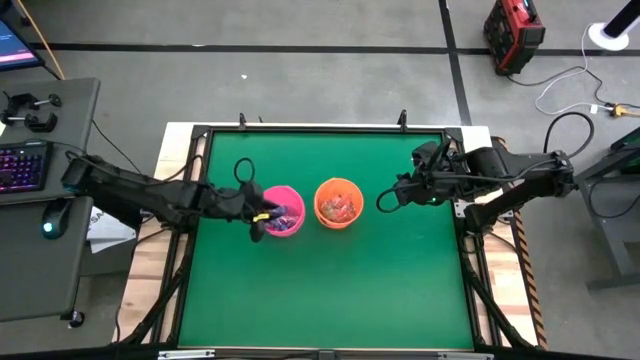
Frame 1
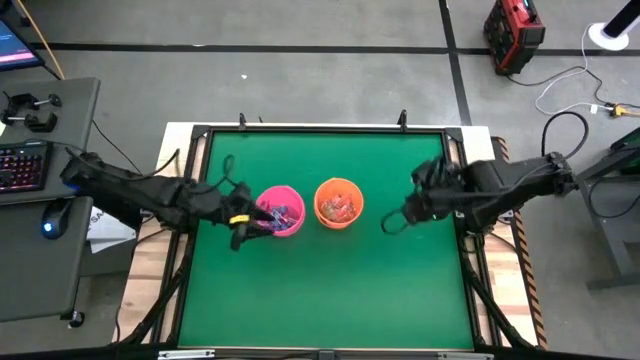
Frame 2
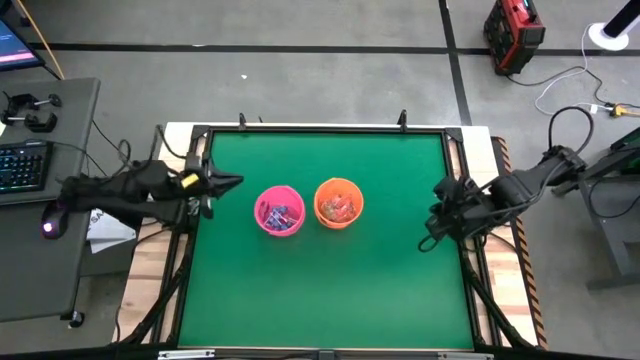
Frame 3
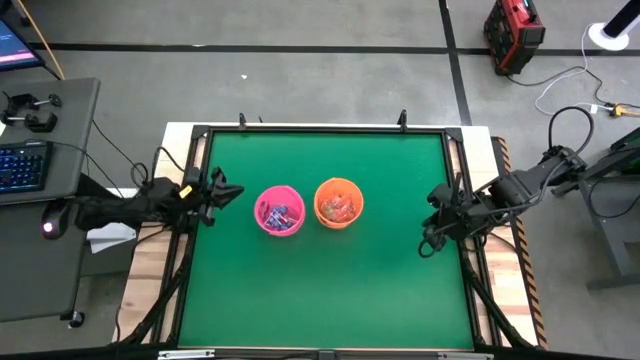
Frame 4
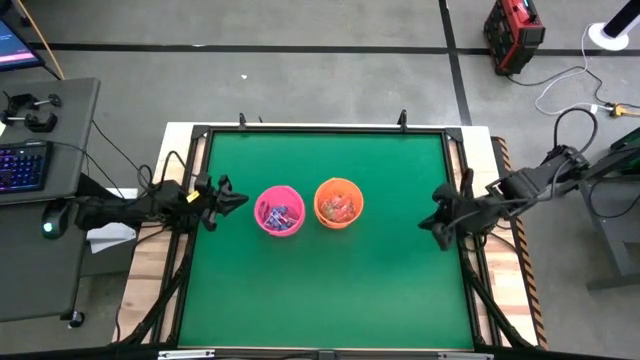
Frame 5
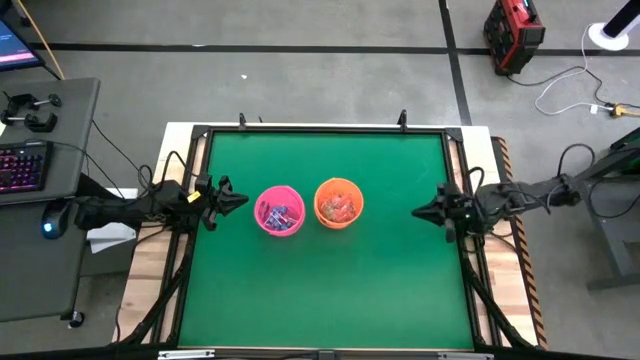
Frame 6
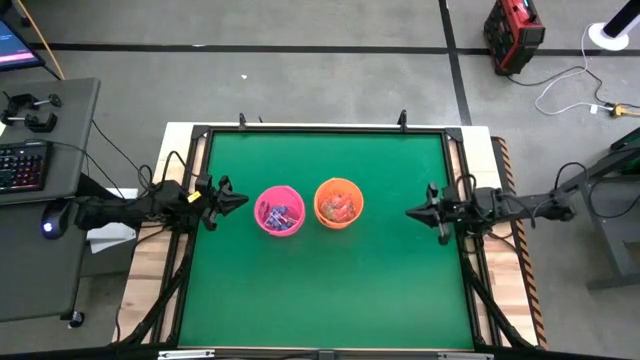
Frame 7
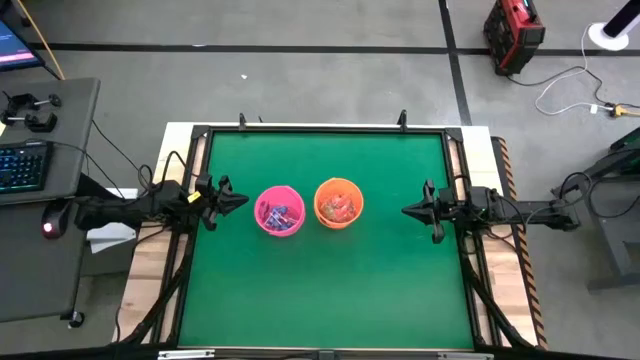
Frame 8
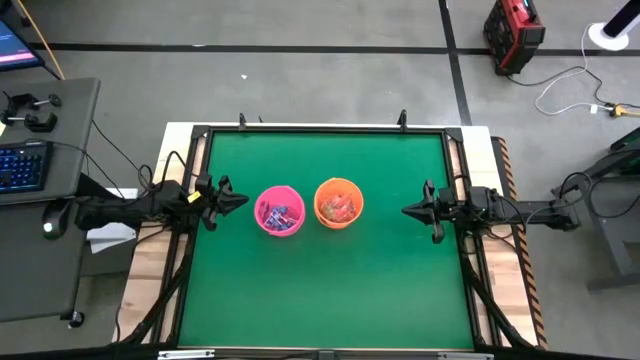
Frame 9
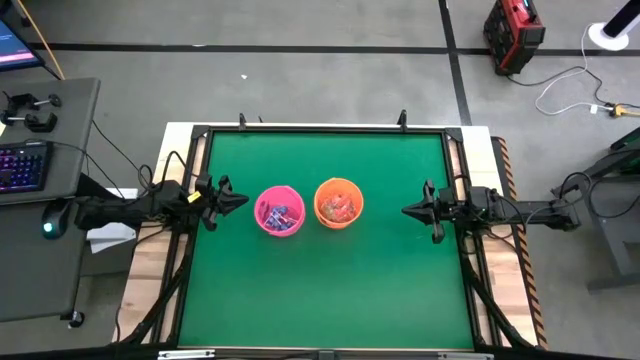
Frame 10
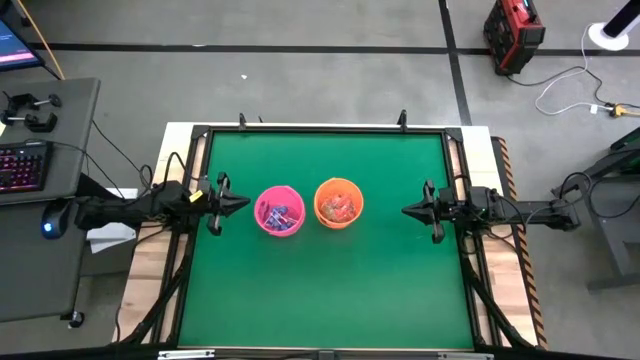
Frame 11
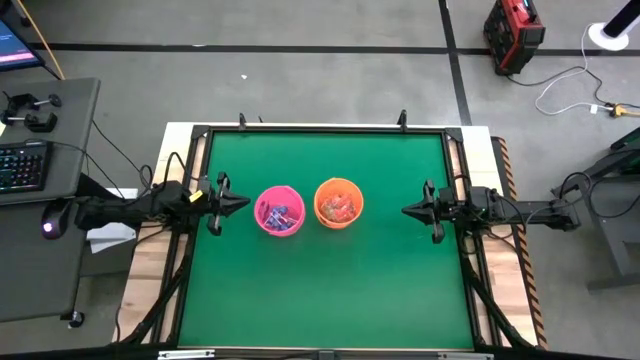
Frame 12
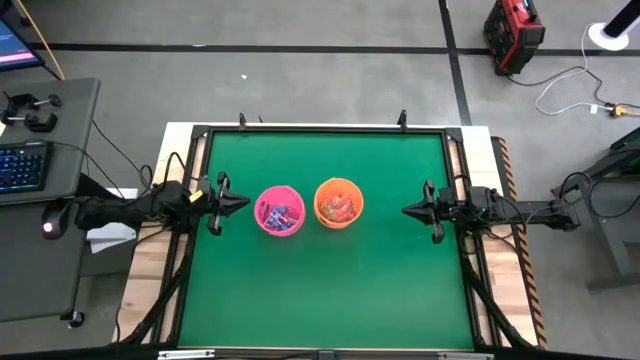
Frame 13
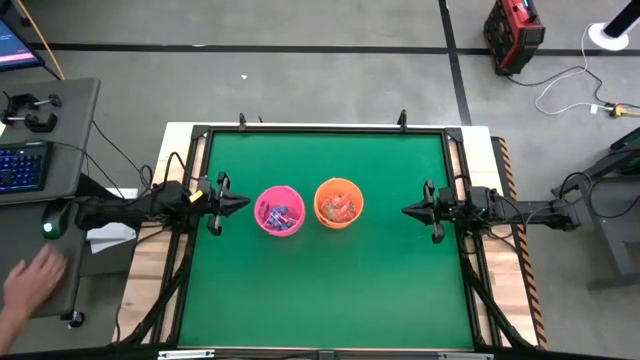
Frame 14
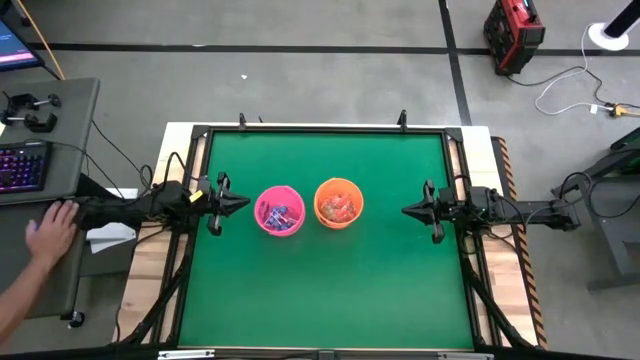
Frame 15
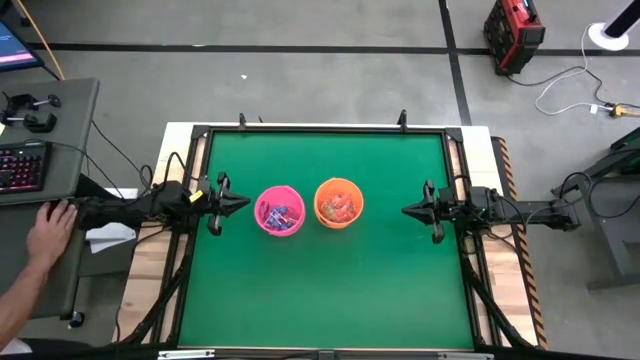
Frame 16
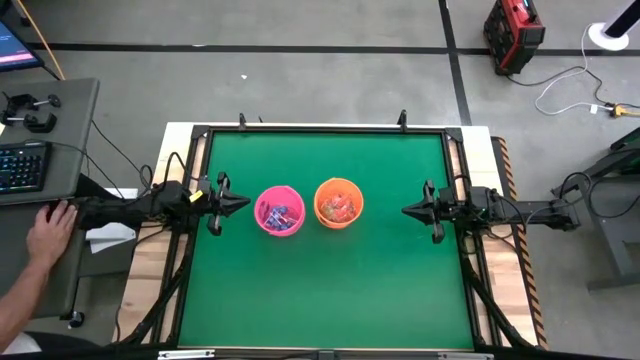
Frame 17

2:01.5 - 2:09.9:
Task: Sort candy by brand, put in halloween buckets
Return to Home Position

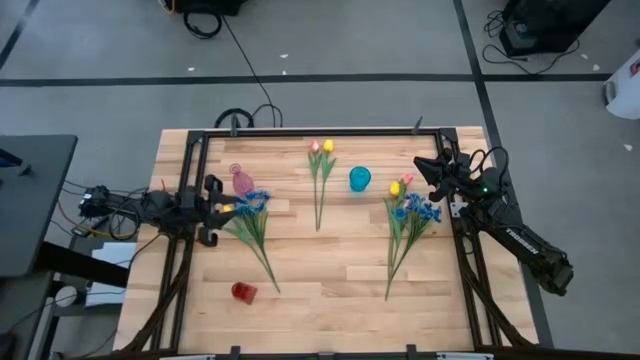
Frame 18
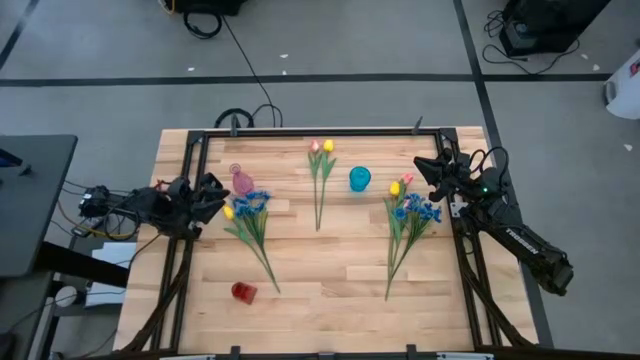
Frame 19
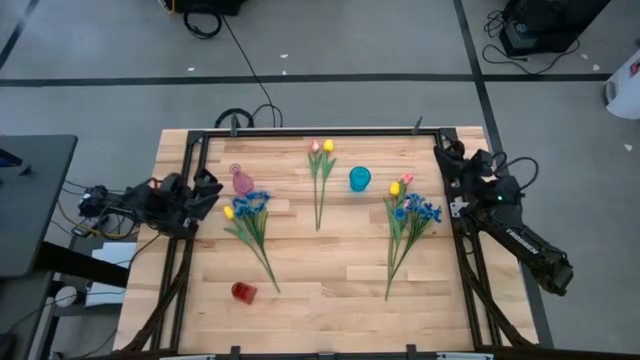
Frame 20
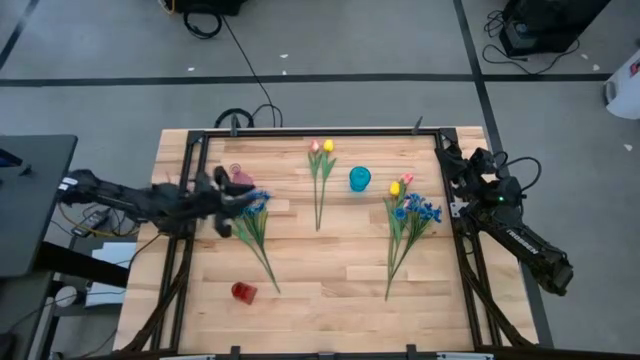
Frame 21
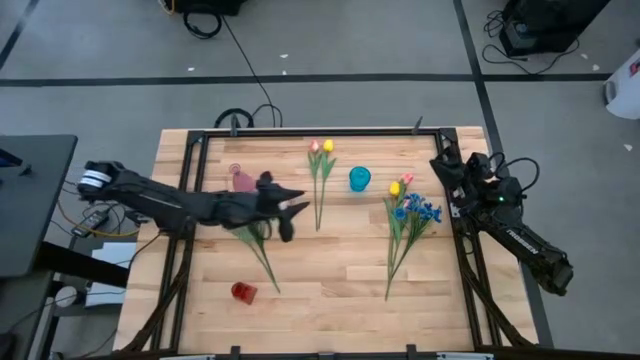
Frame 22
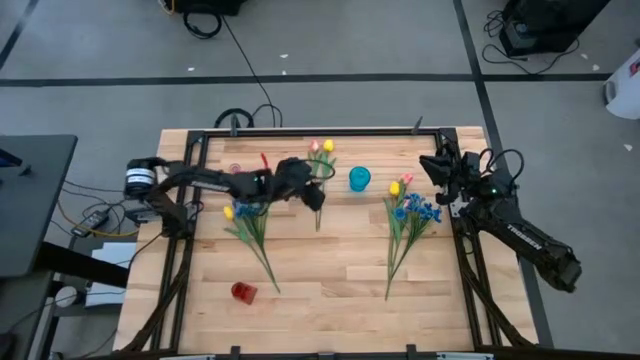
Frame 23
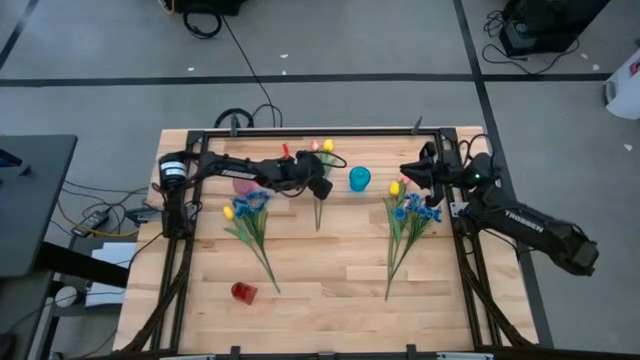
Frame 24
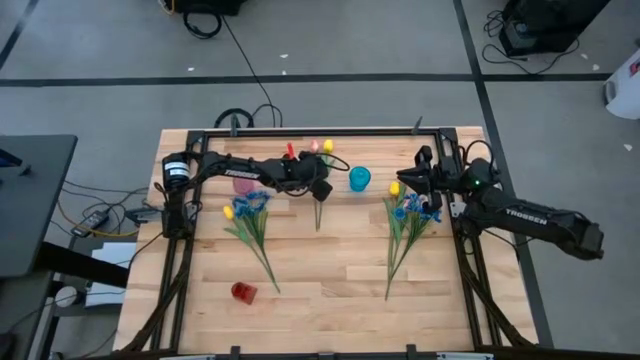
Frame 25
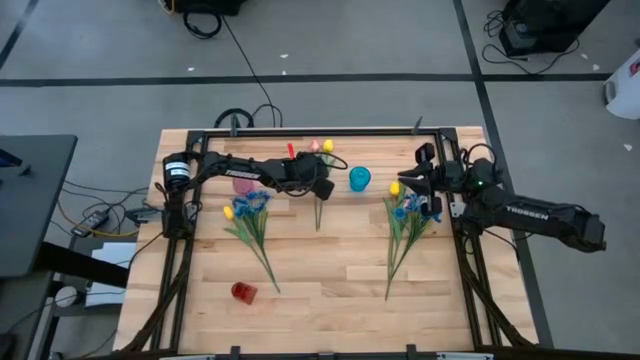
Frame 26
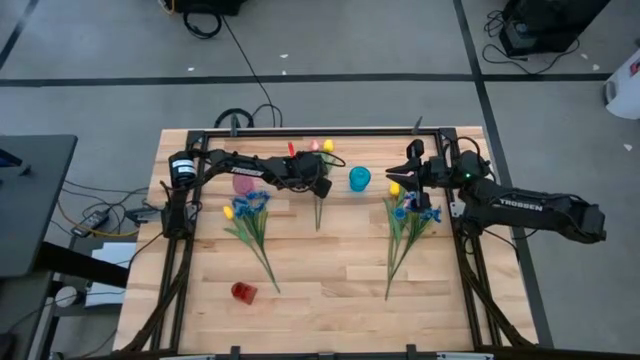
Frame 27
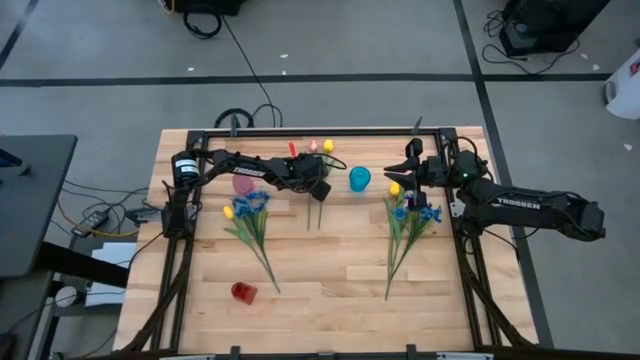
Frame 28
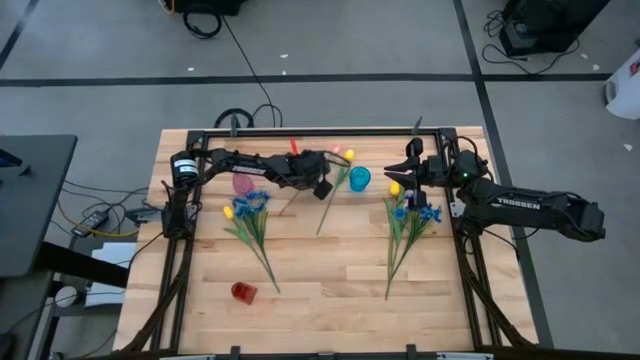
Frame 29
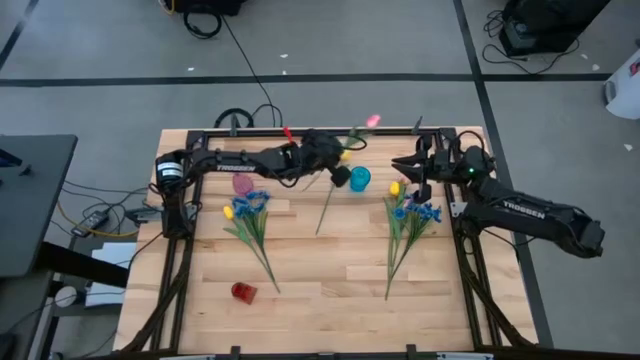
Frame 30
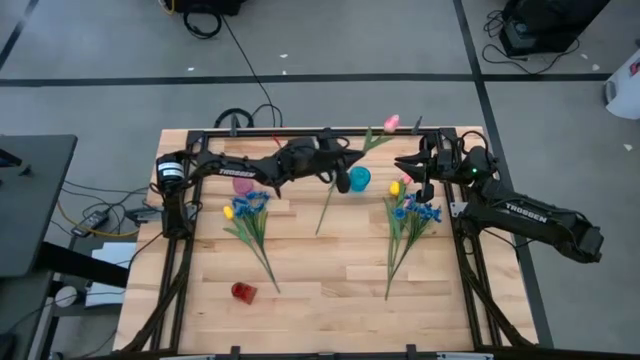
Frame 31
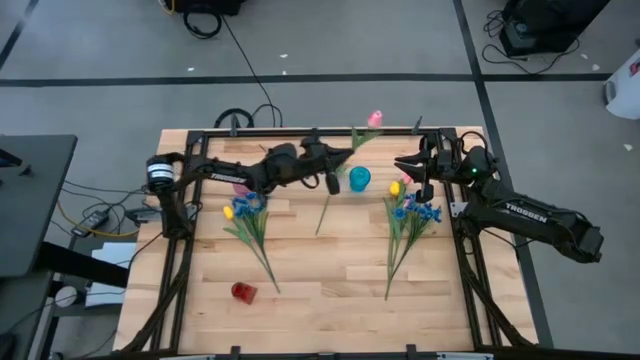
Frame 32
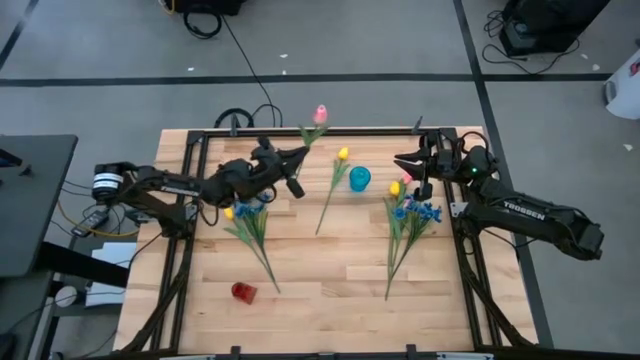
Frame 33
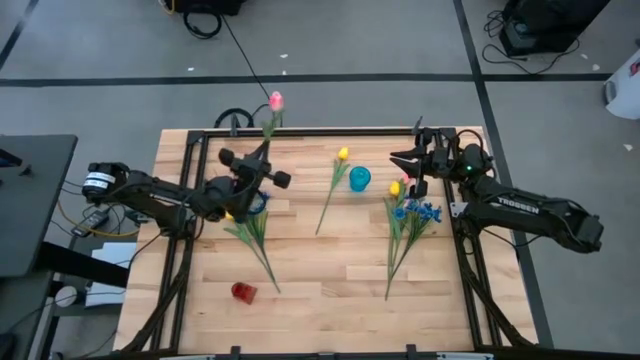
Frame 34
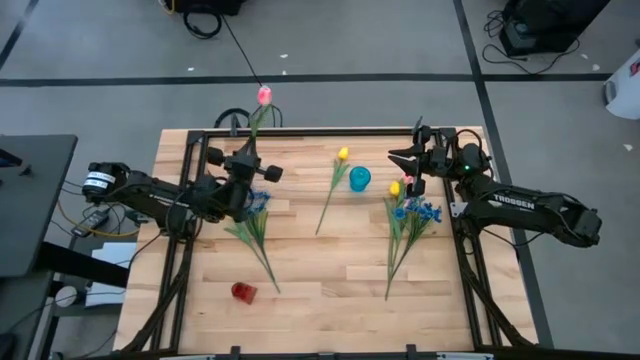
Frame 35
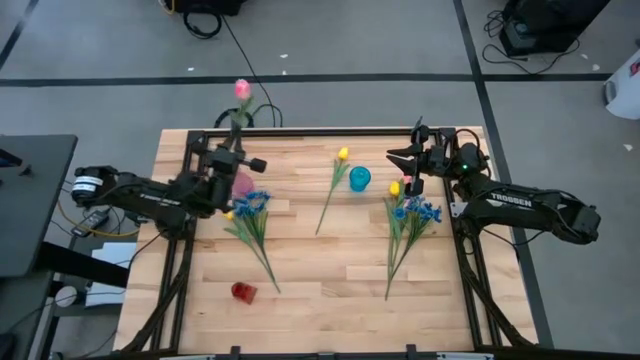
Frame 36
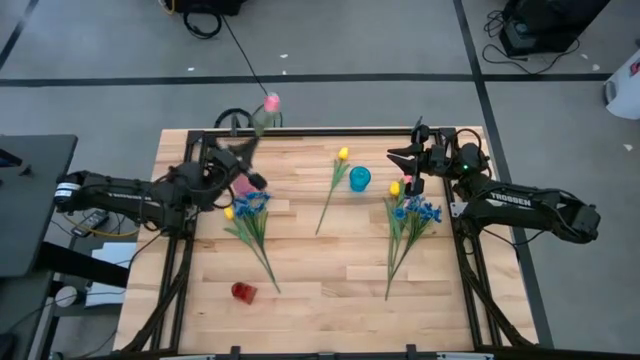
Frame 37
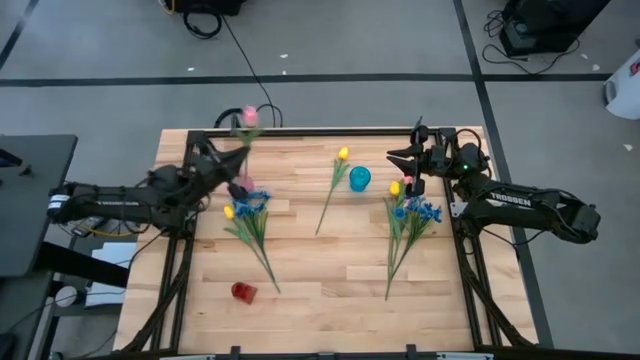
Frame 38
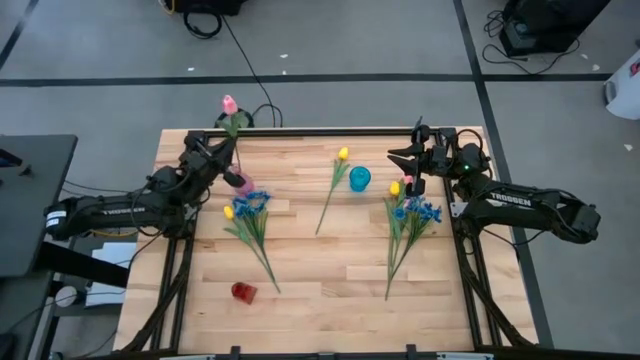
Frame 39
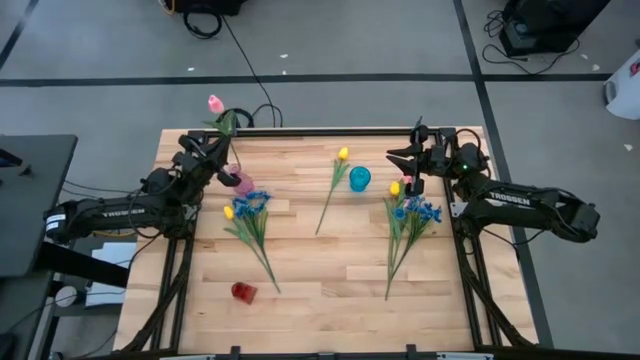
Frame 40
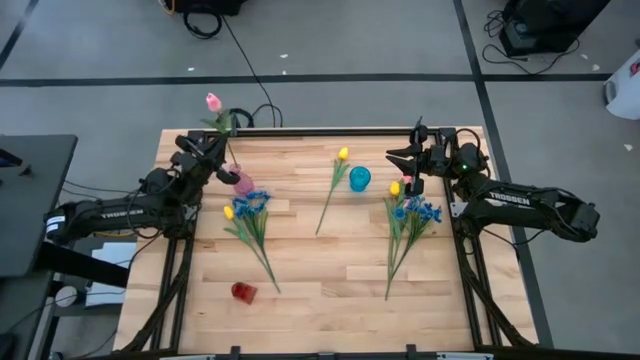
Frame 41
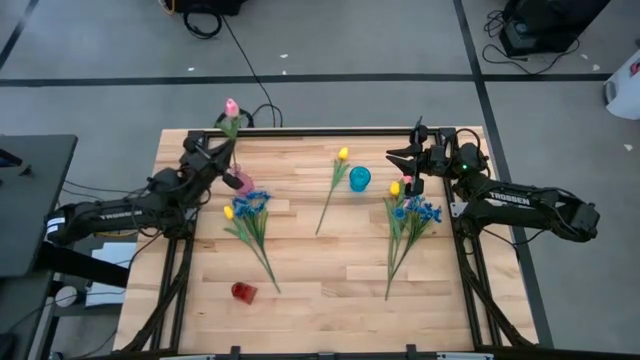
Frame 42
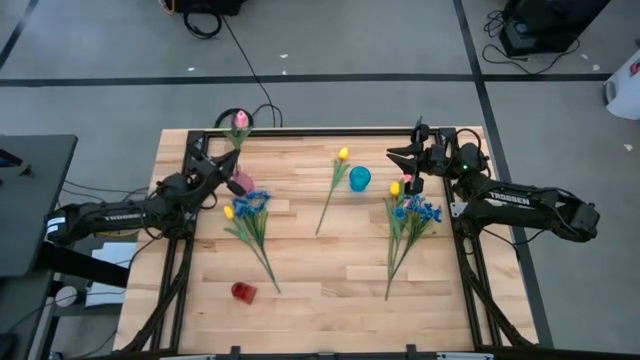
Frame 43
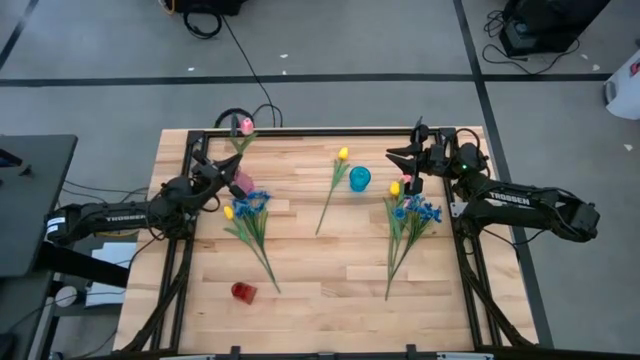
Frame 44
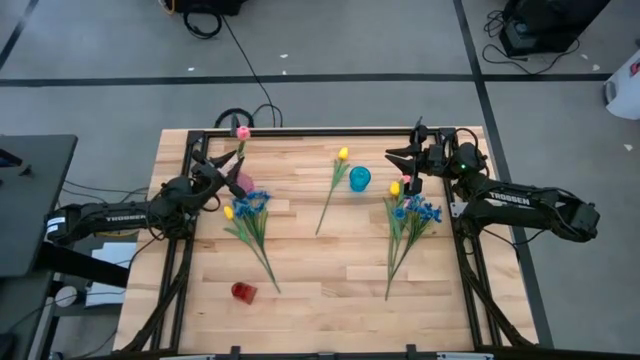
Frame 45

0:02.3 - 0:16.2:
Task: Sort flowers into vase by color
Put the top left pink tulip into the violet vase
